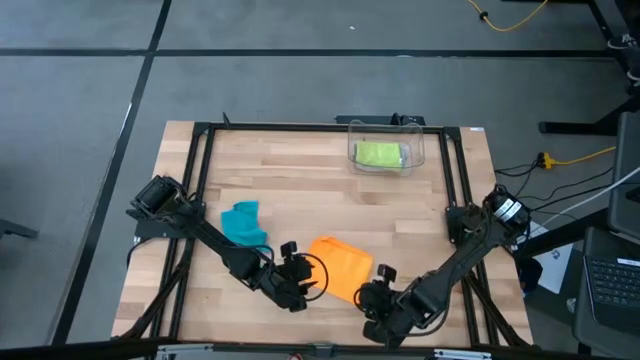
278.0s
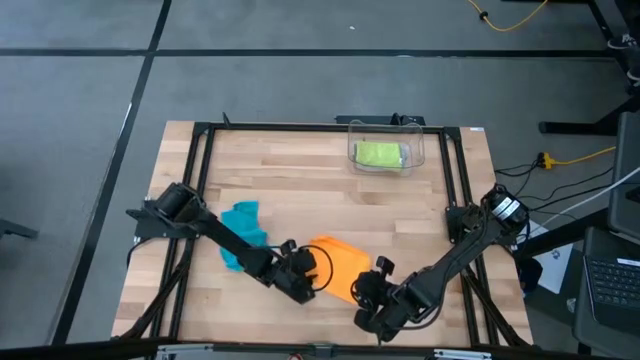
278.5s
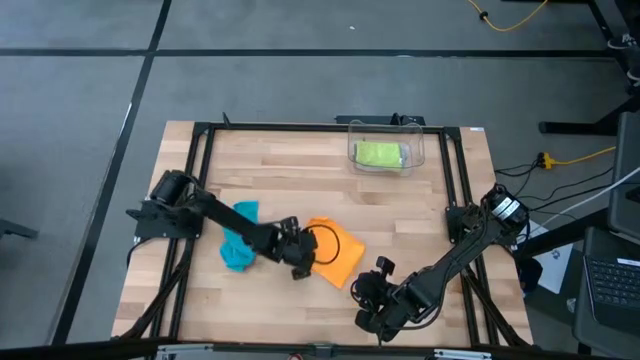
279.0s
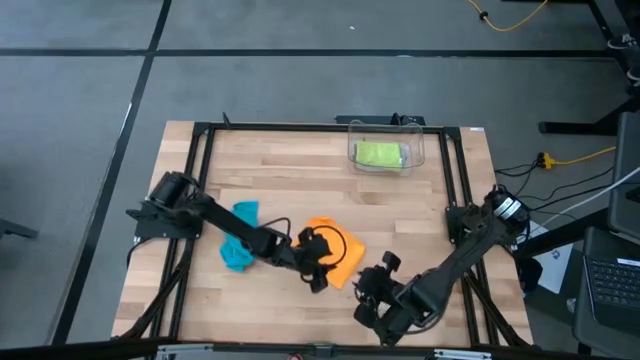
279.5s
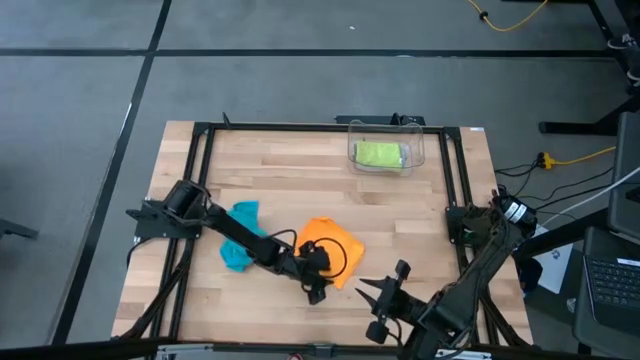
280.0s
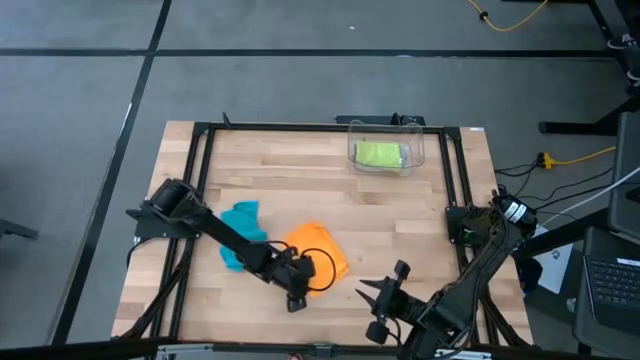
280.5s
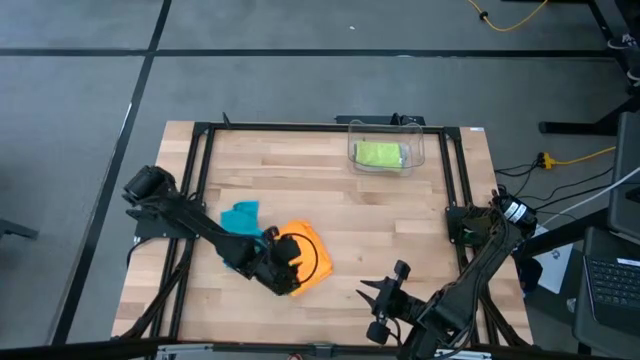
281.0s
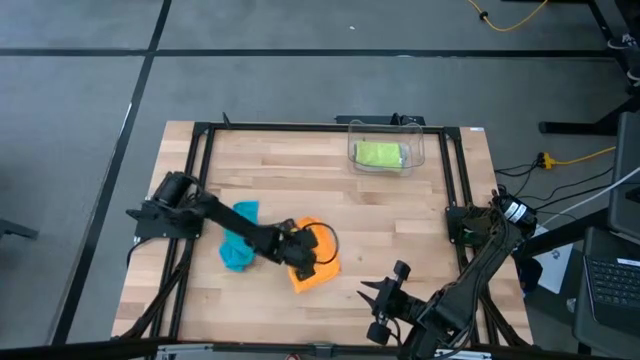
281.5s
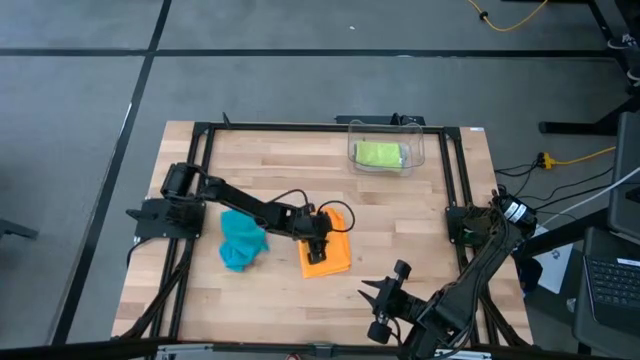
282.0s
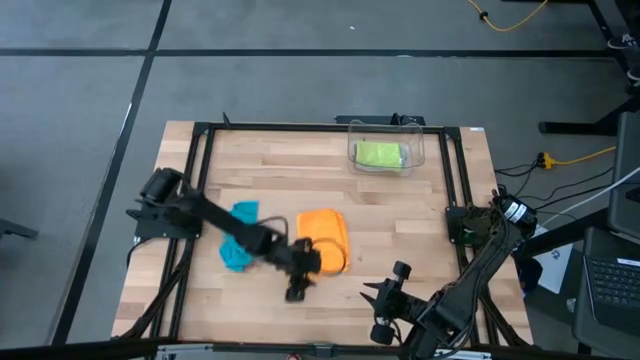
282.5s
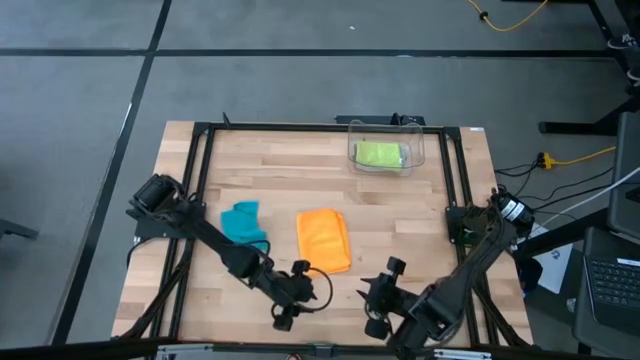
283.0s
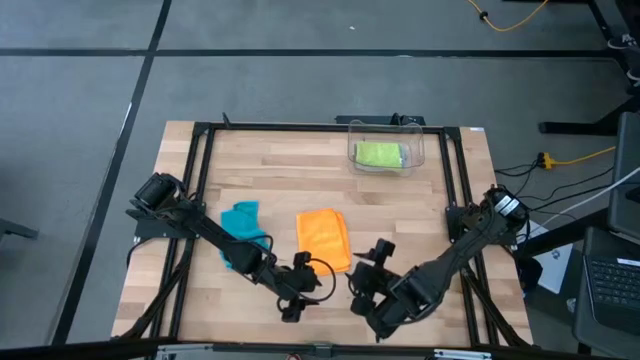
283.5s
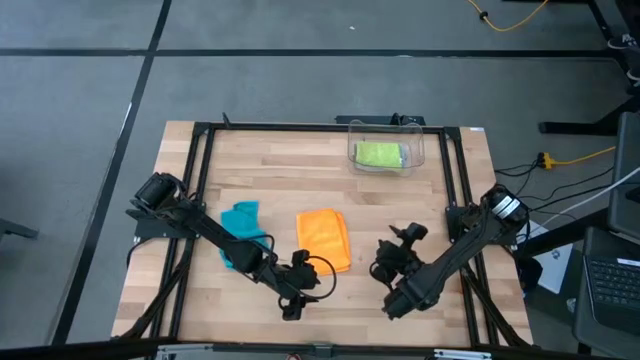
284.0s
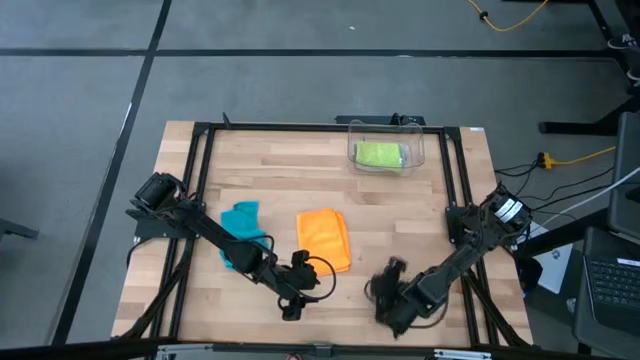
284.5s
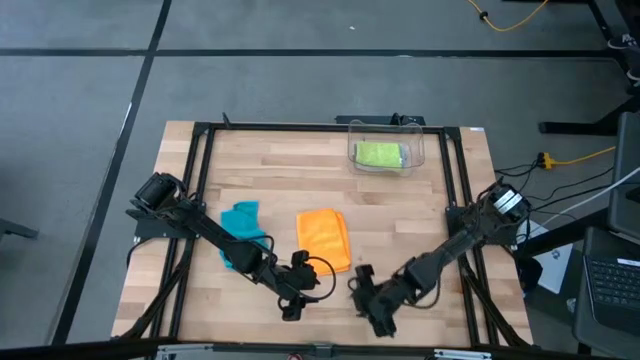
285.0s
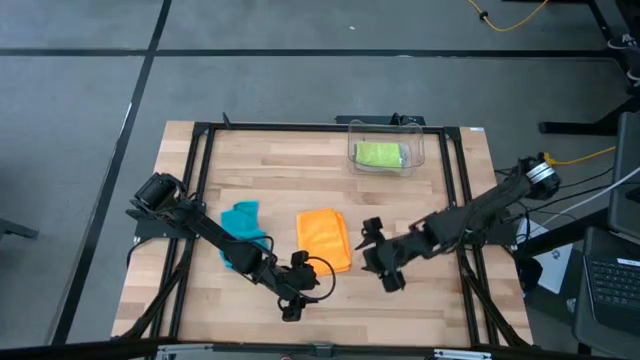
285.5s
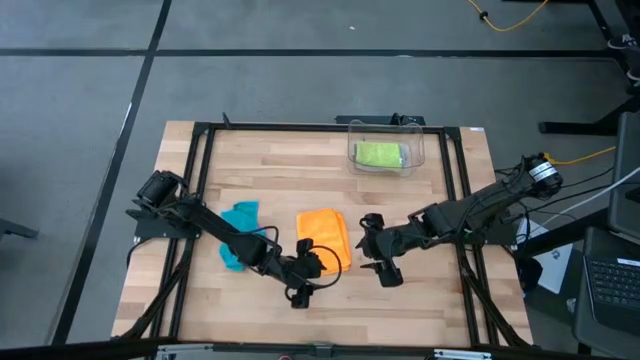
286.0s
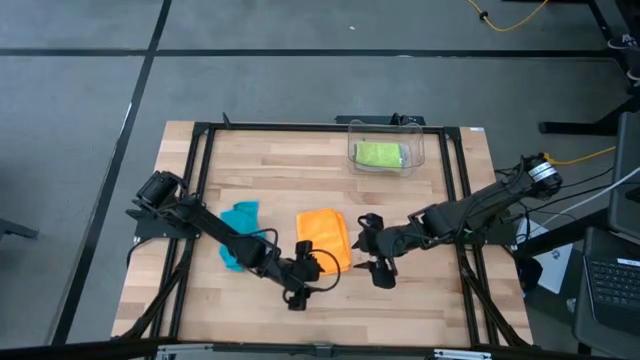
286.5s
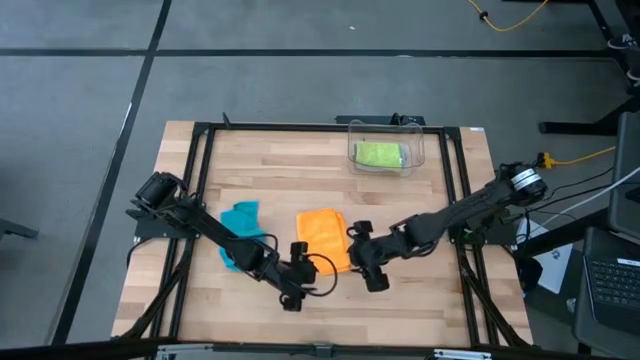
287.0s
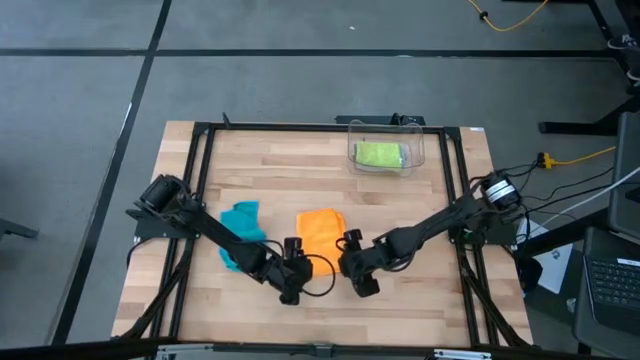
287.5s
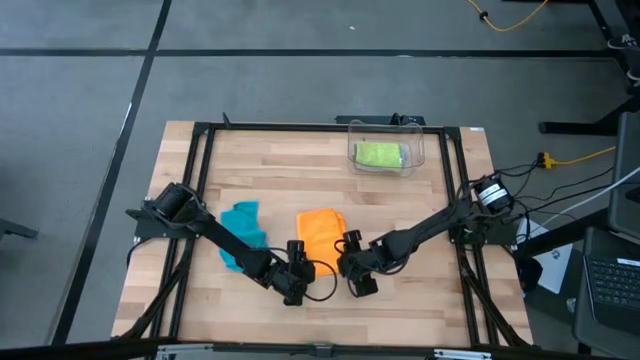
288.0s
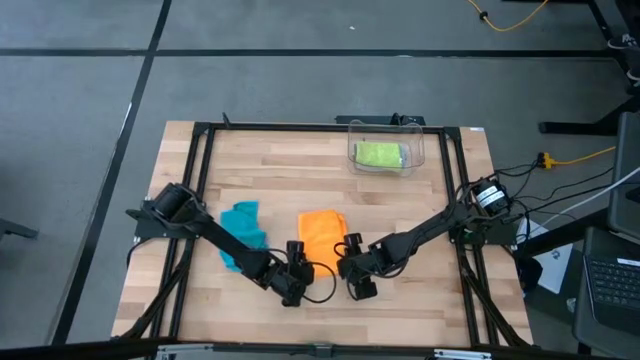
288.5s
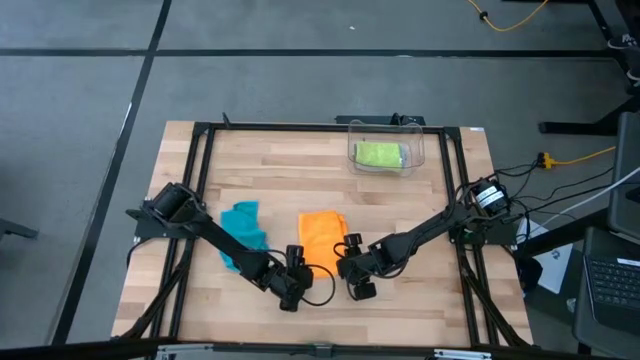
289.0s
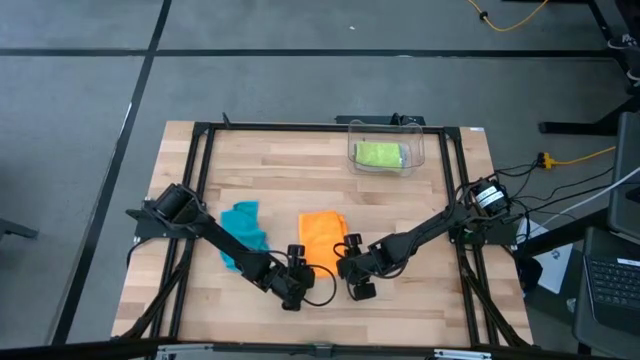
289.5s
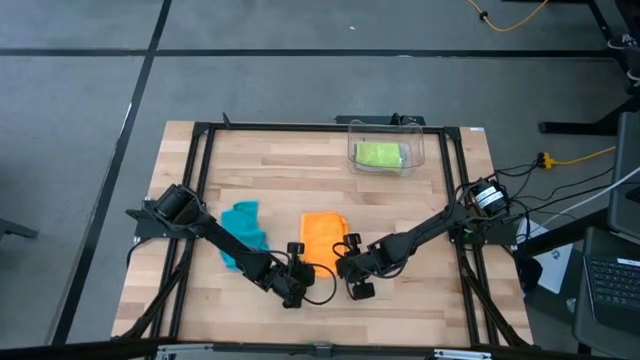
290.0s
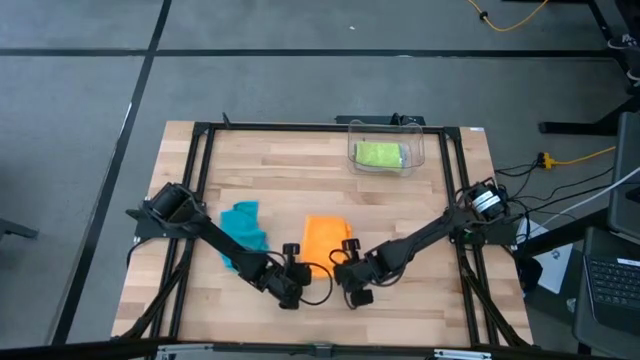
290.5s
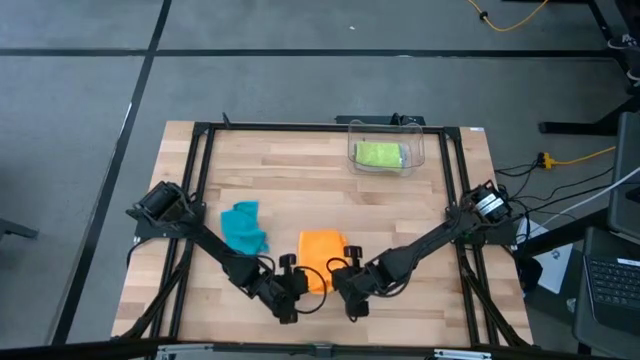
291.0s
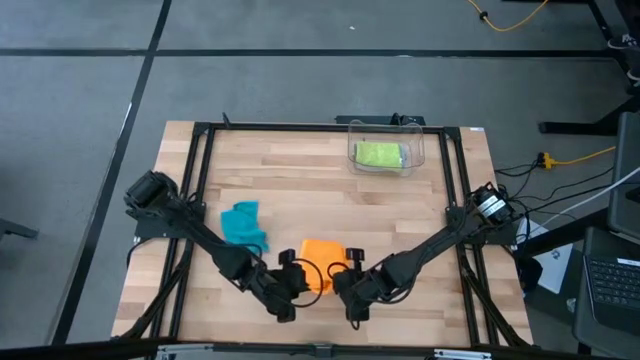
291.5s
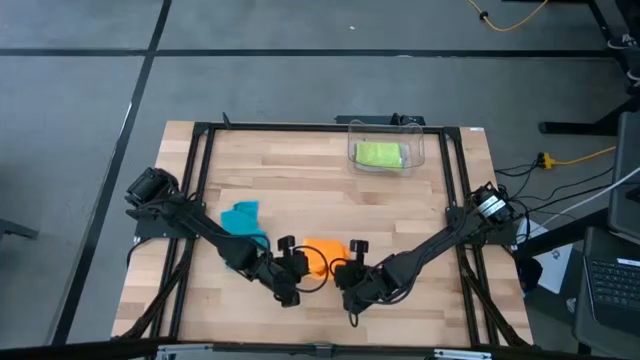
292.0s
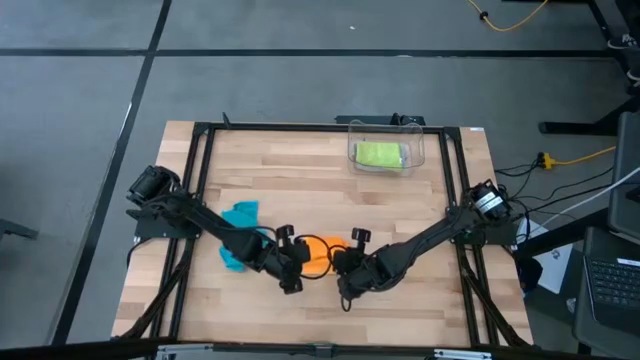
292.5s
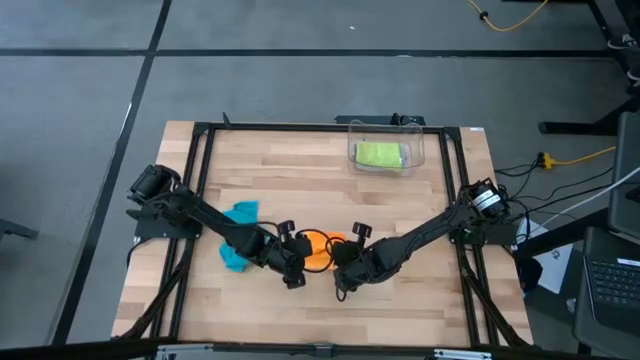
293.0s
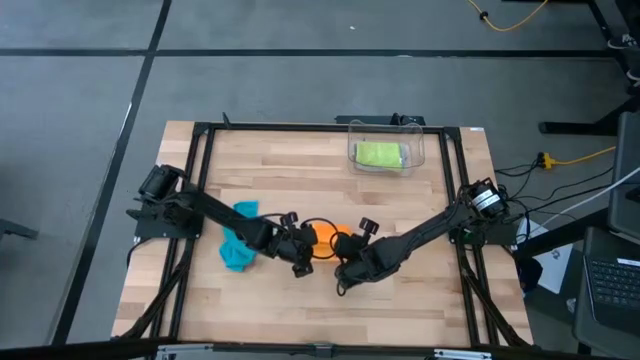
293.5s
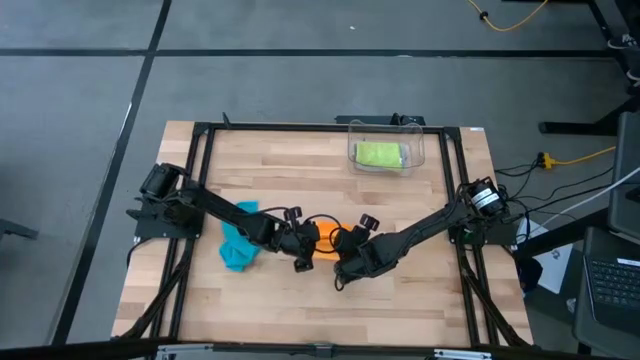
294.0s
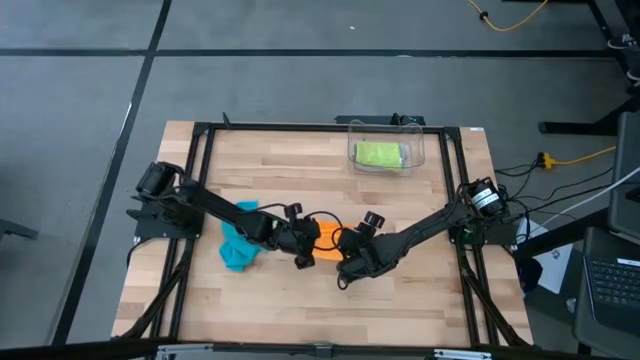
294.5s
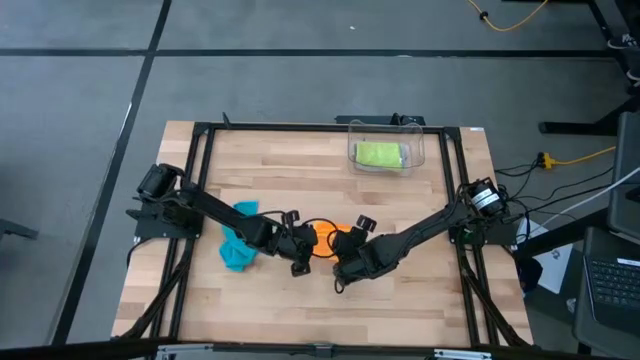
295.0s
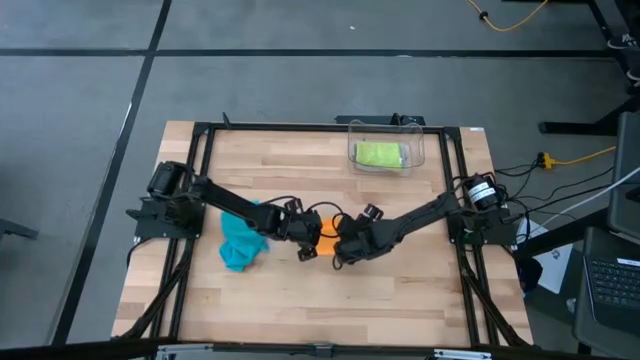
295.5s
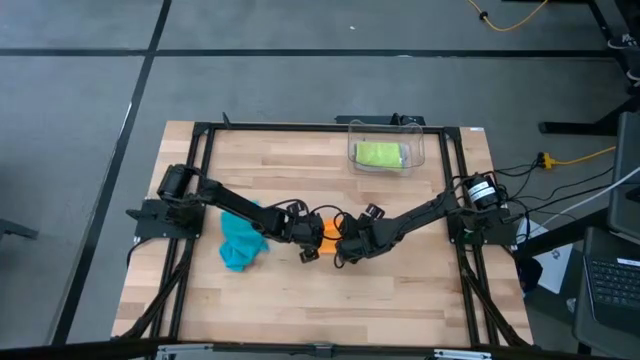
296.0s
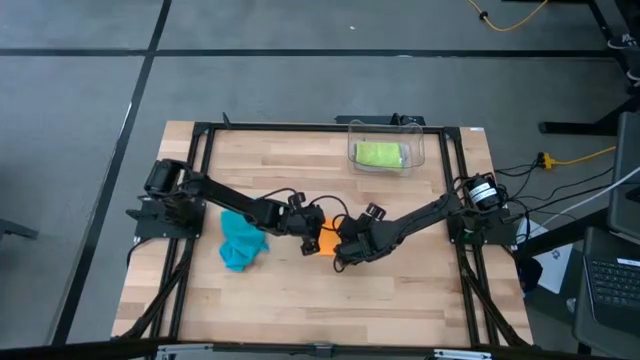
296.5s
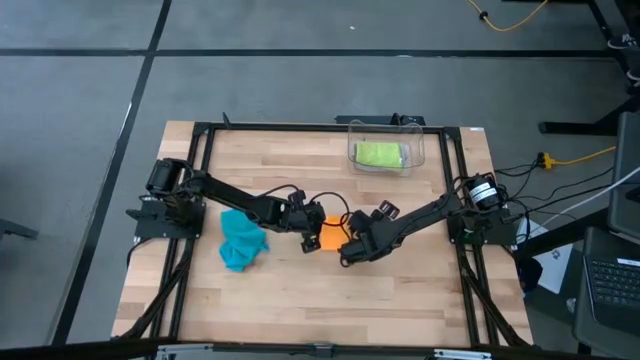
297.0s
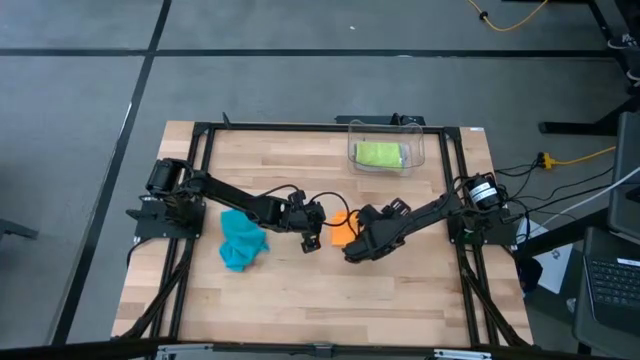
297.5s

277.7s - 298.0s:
Task: Fold microfiber towels
Fold the orange microfiber

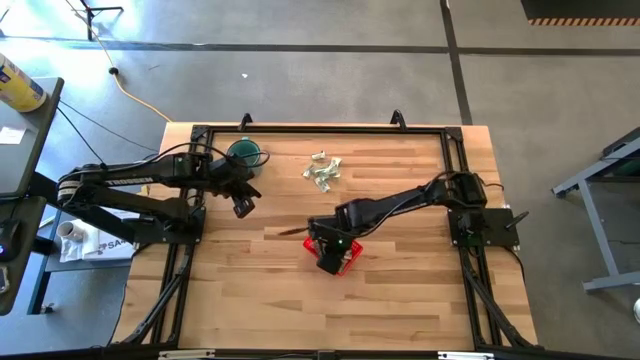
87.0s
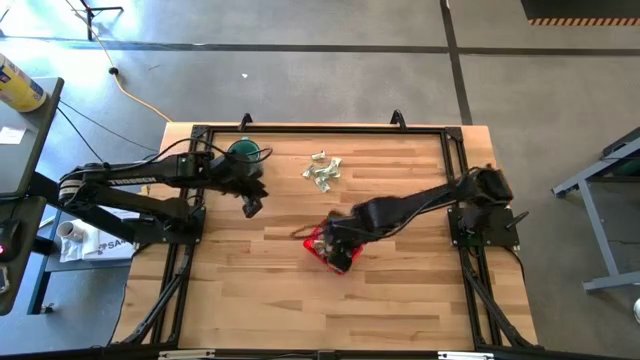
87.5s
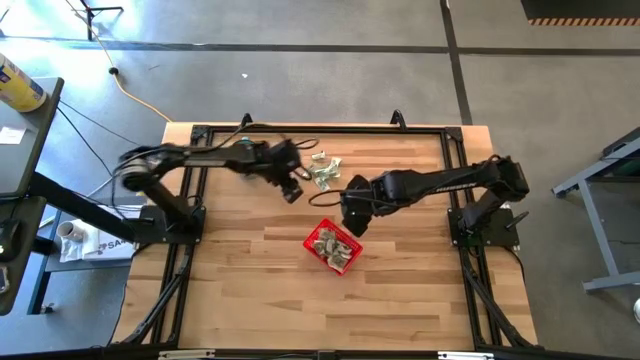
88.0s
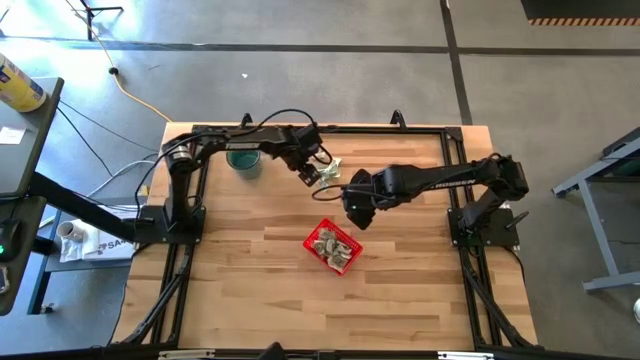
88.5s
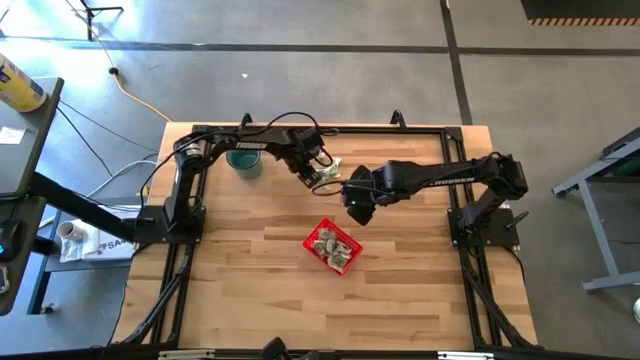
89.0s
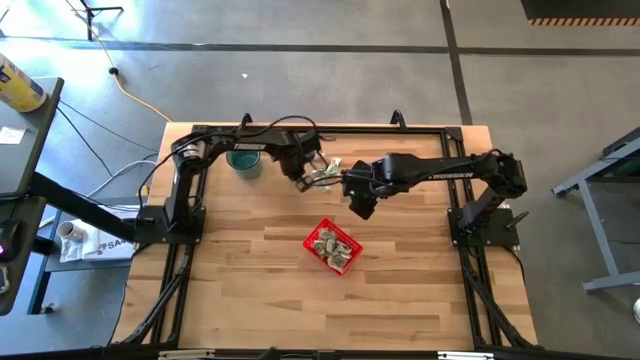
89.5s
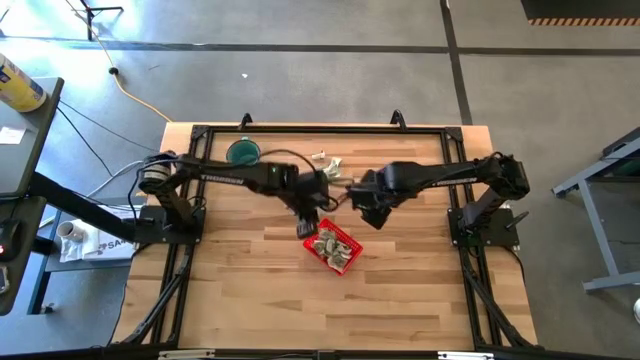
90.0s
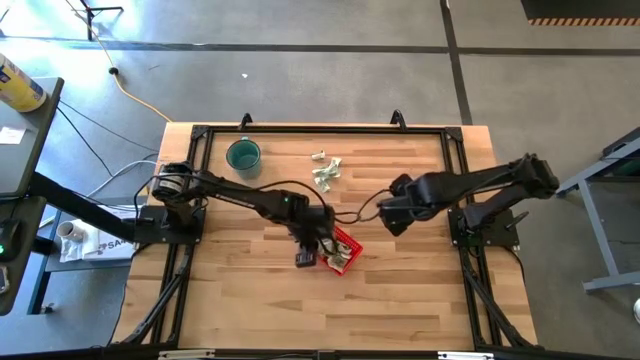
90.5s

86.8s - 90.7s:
Task: Pick and place Stevia / Truvia into bins
Put the light green stevia packet into the bin
